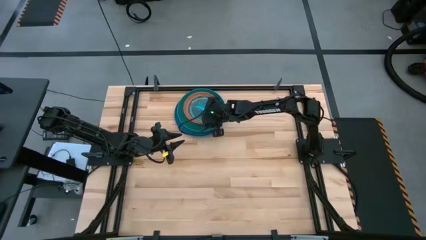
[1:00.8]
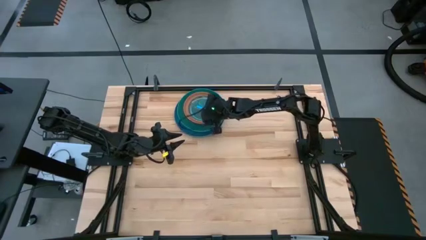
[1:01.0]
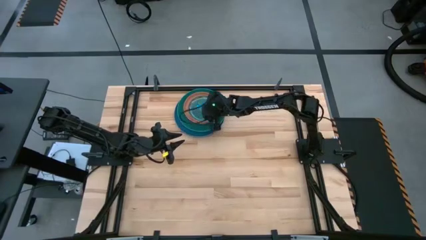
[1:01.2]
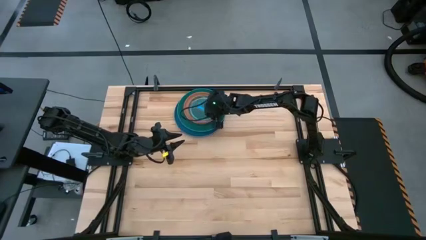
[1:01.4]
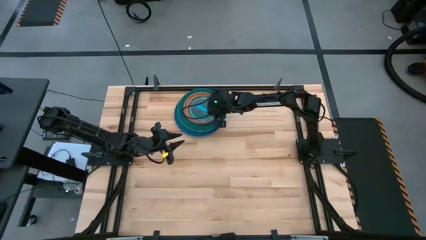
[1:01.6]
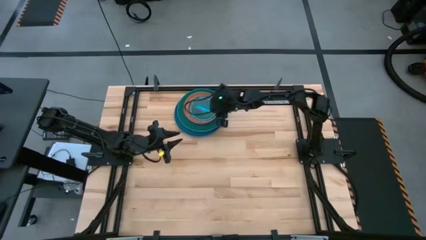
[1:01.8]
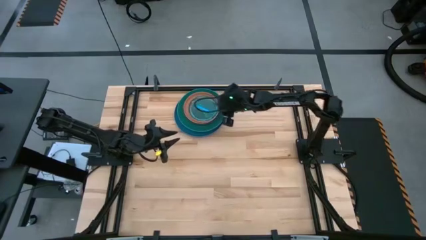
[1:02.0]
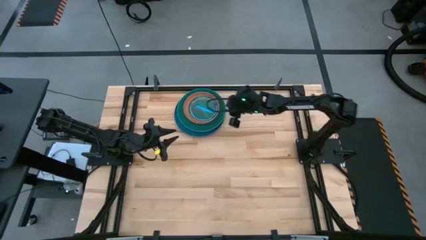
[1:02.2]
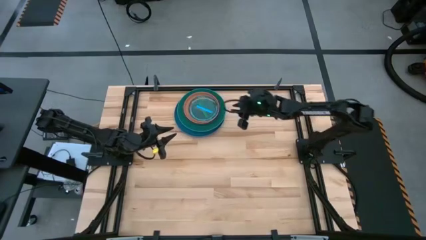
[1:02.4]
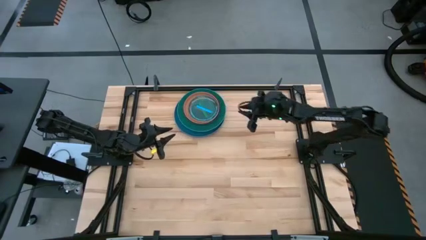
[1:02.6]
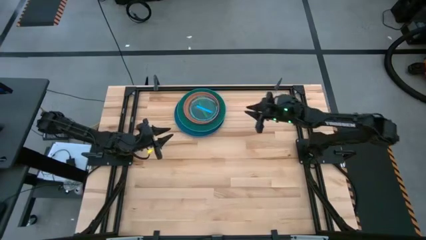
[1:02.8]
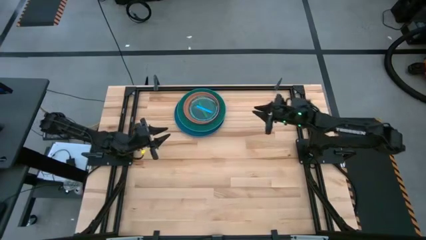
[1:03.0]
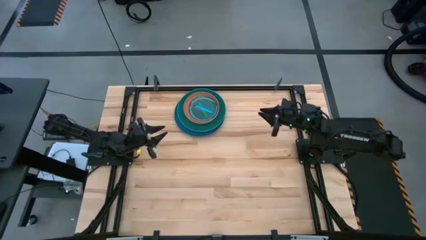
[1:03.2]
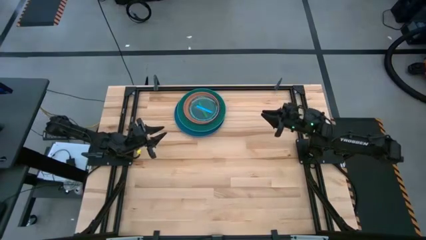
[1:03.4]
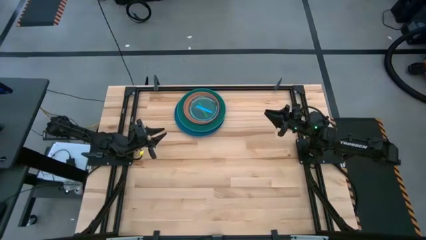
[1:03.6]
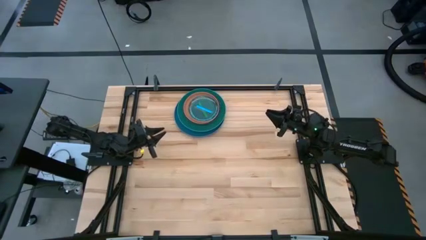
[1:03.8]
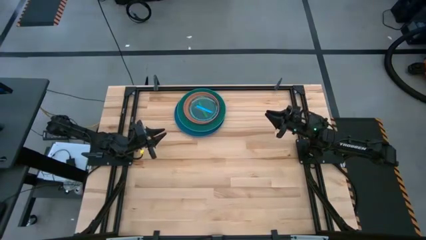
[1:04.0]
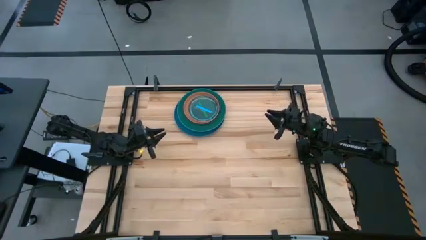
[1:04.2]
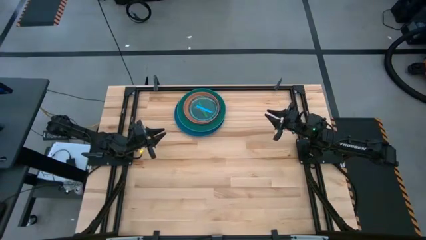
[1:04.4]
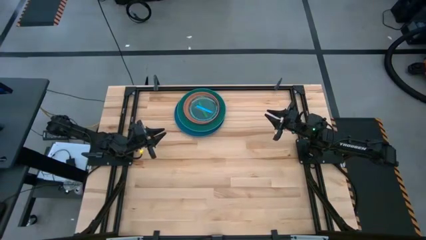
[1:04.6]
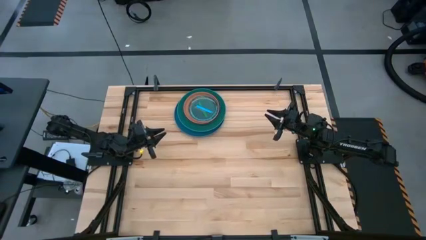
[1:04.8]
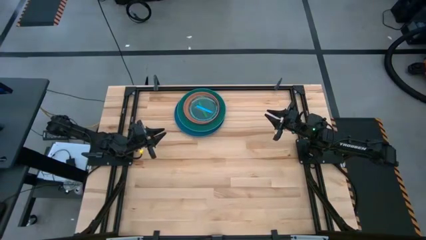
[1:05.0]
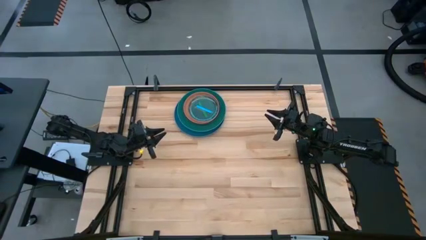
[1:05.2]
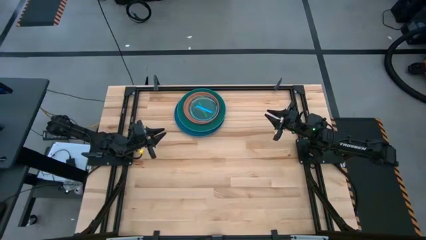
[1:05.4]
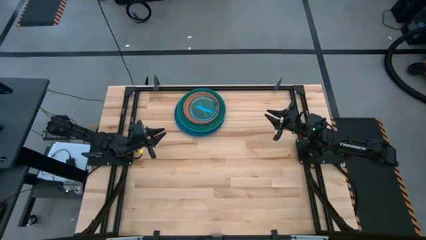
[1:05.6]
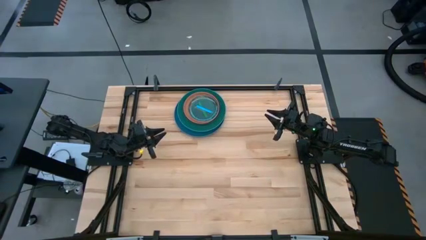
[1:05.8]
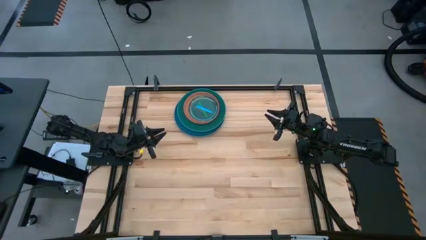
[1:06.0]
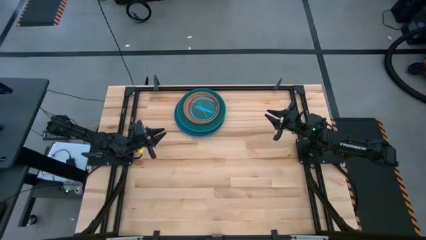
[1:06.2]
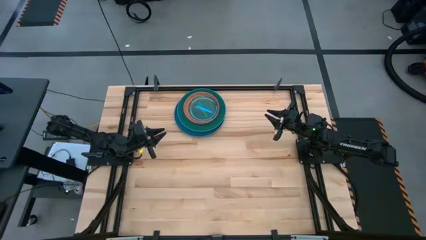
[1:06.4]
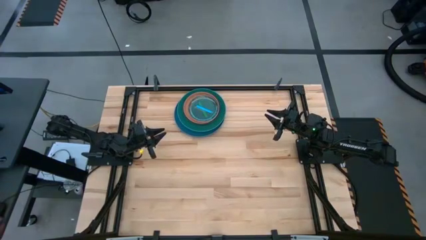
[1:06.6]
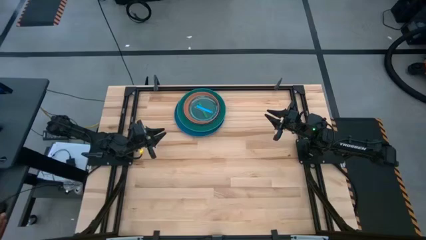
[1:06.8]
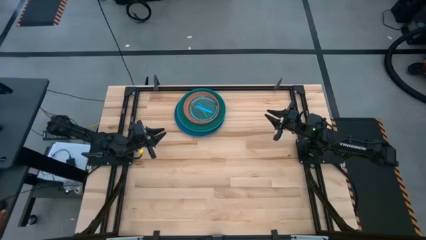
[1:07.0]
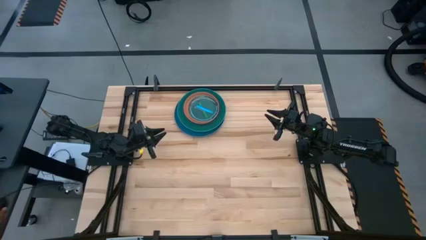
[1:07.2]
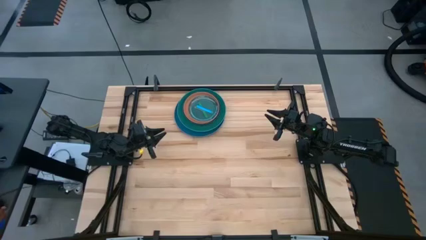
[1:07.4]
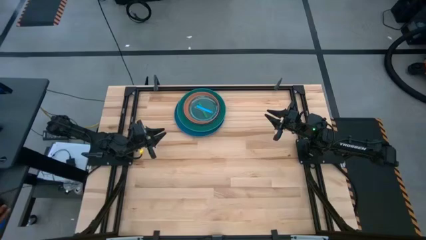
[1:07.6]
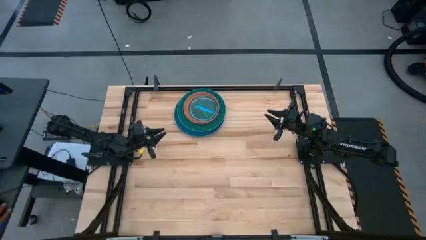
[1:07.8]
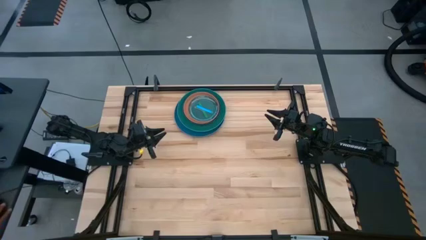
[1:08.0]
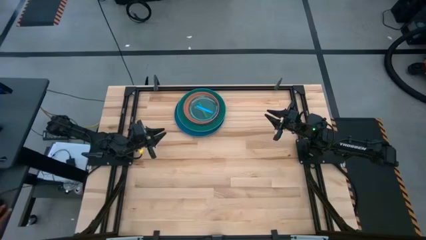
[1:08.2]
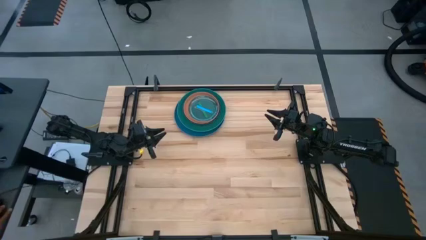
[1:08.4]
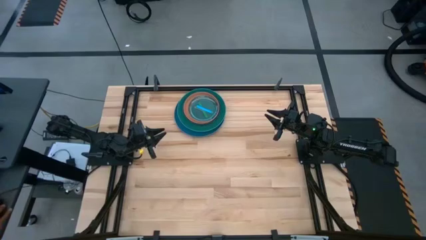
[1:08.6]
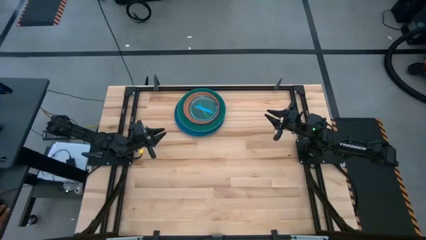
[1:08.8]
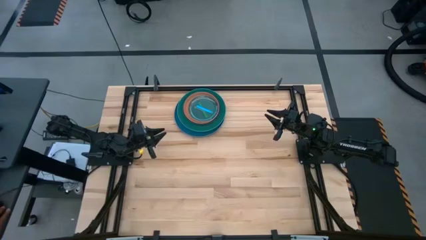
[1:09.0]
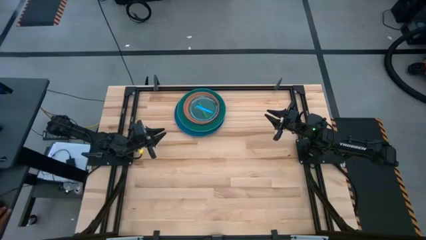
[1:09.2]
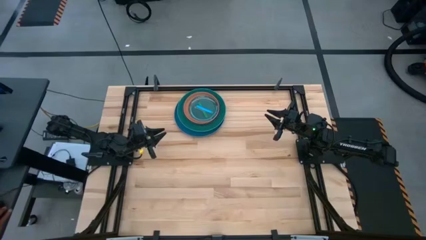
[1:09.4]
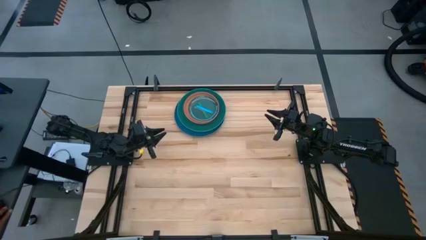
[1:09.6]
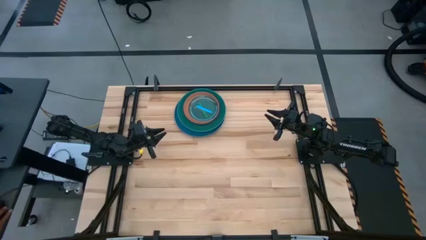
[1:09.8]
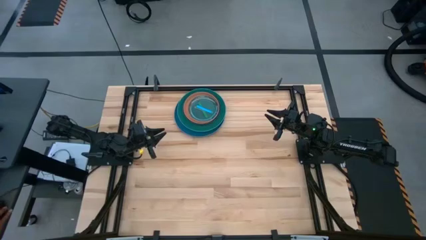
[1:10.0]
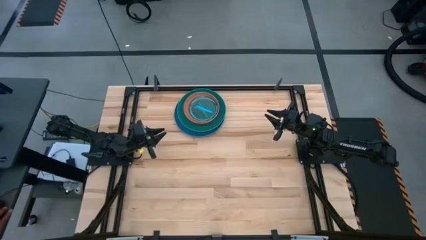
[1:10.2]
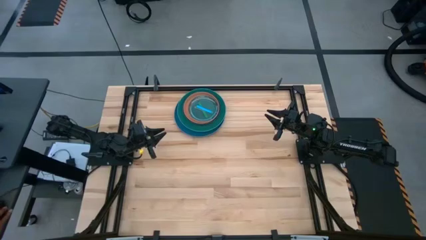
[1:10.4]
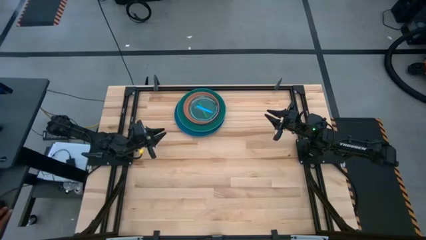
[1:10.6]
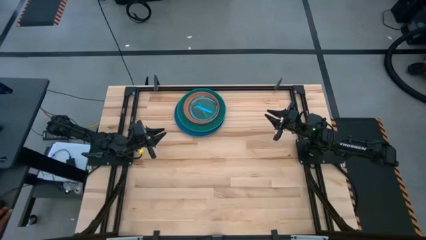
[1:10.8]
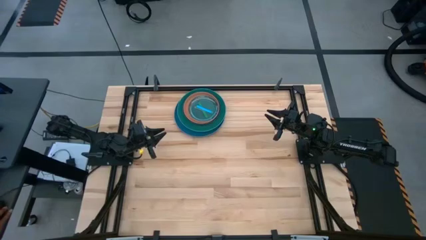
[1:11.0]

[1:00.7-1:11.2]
Task: Stack plastic plates
Return to Home Position

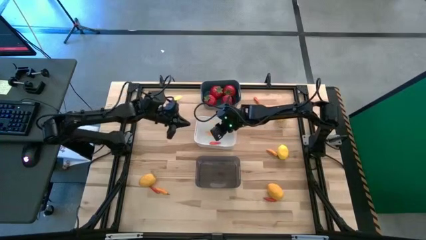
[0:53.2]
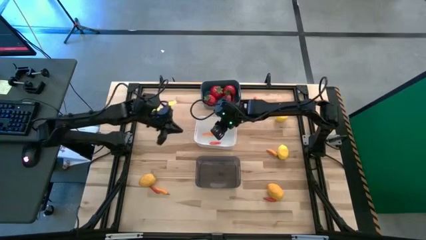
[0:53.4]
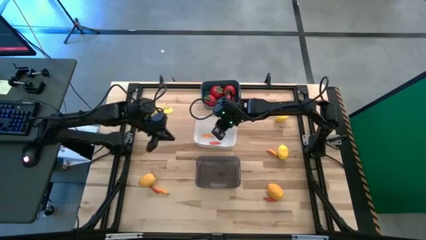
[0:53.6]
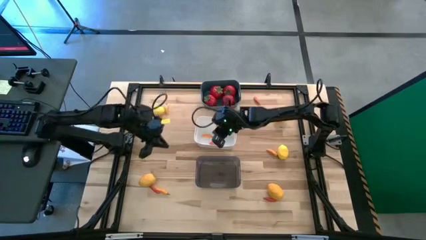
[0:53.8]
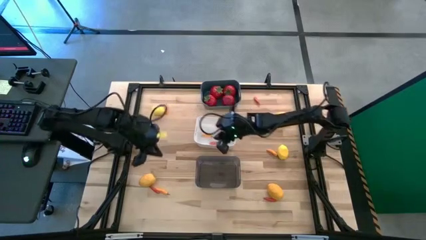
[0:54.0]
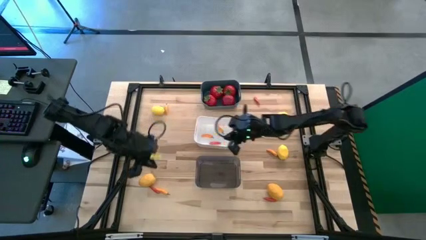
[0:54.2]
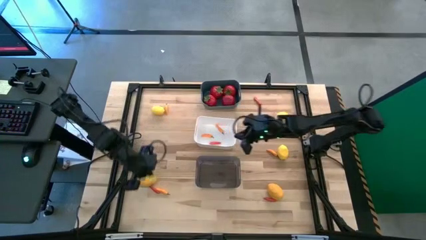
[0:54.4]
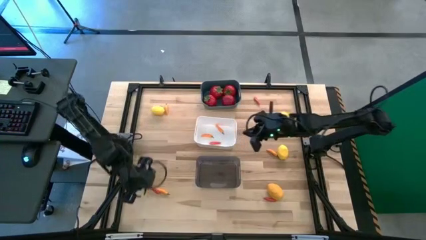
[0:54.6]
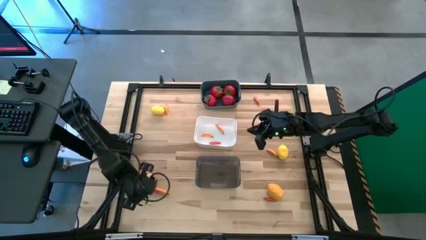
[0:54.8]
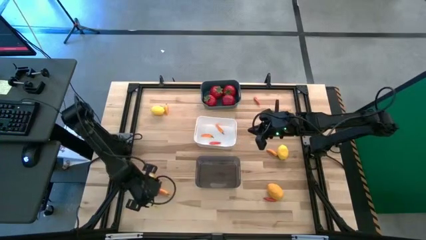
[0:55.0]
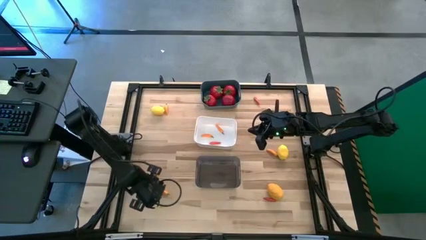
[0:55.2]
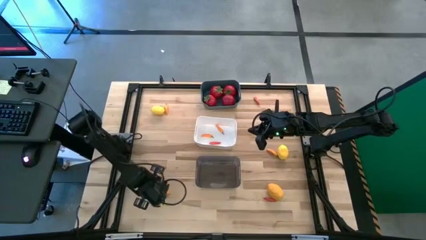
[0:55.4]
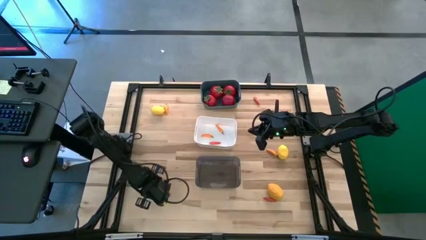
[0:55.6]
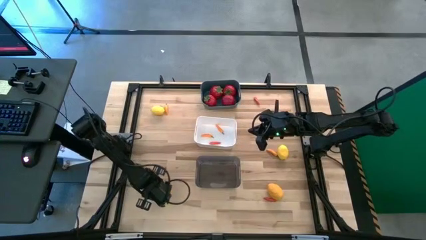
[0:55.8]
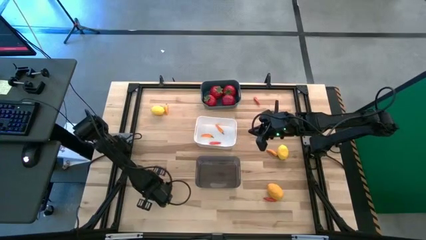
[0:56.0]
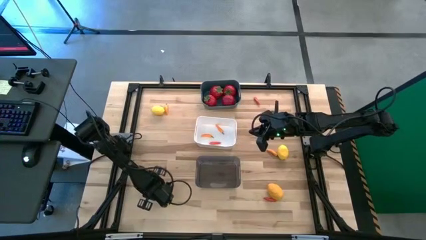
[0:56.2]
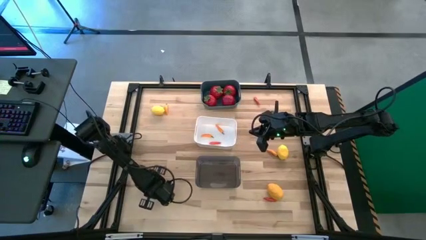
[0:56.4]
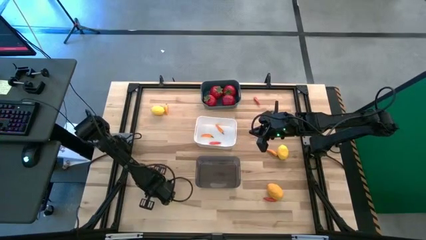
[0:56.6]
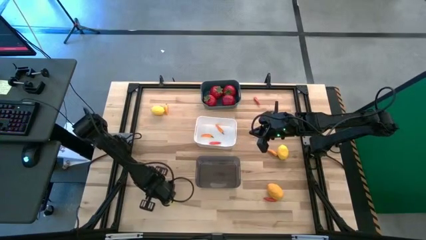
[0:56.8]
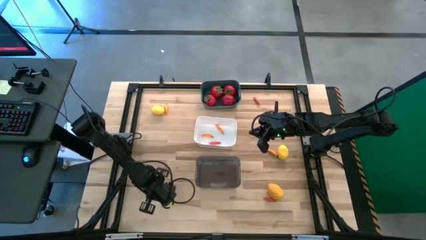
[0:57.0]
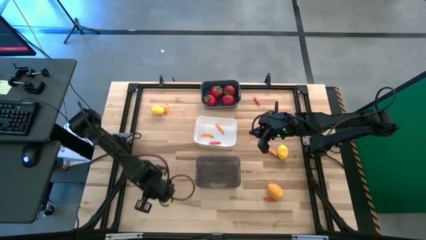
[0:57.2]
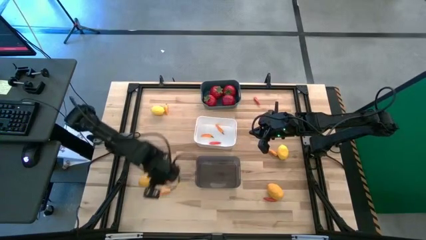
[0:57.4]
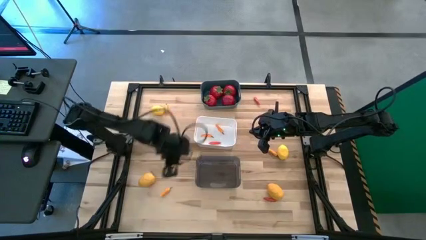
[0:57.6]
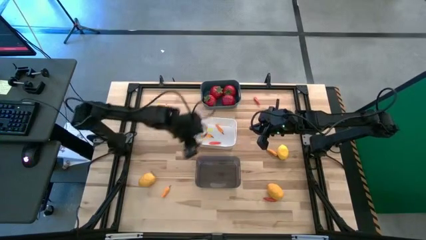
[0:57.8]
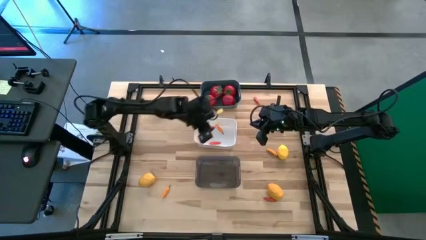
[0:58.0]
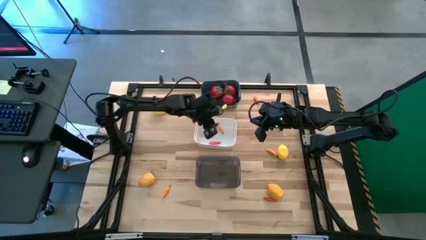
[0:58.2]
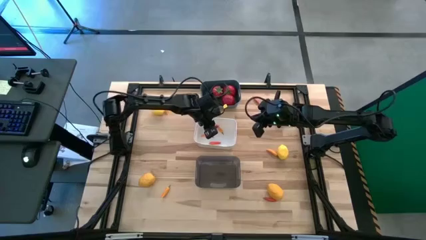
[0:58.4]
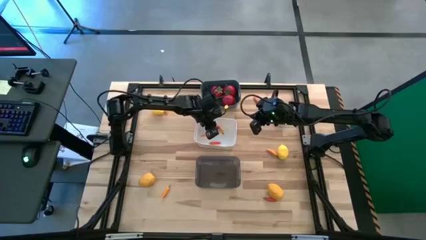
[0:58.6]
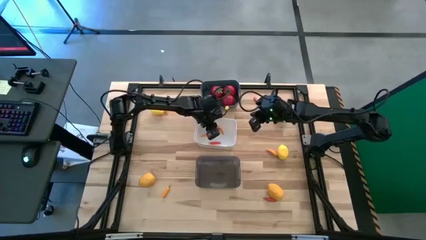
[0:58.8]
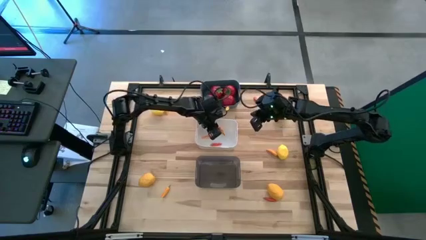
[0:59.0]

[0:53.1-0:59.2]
Task: Sort produce into baskets
Put the red chili pepper into the white bin
